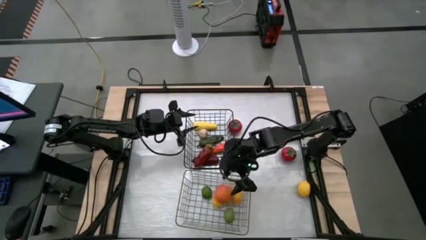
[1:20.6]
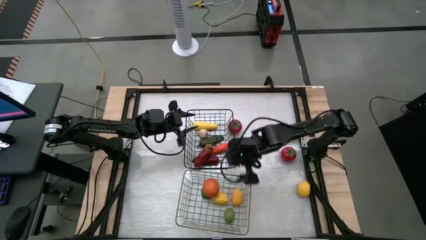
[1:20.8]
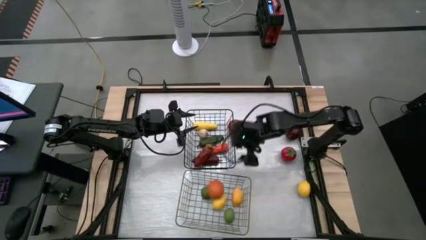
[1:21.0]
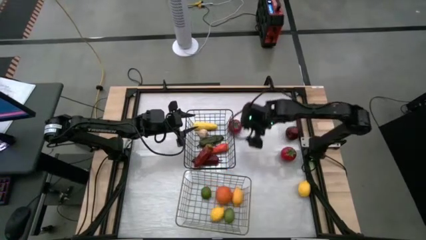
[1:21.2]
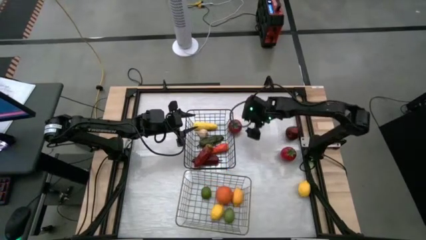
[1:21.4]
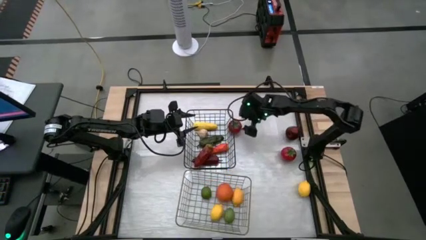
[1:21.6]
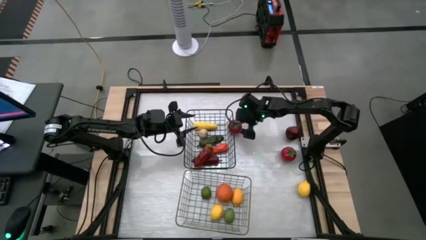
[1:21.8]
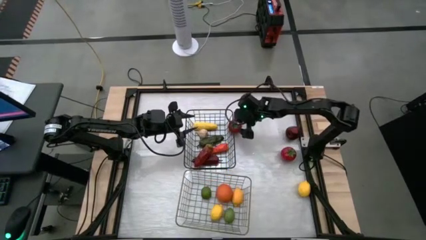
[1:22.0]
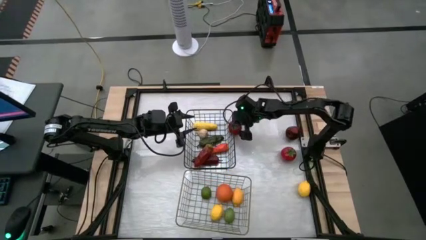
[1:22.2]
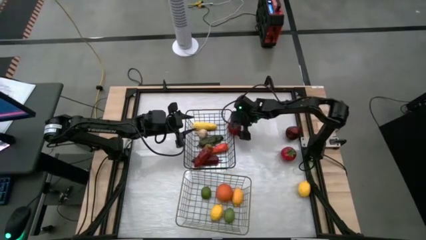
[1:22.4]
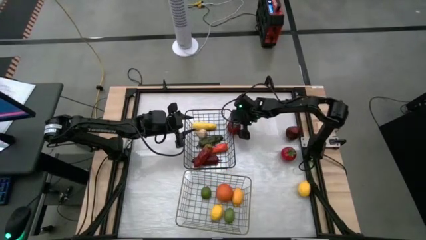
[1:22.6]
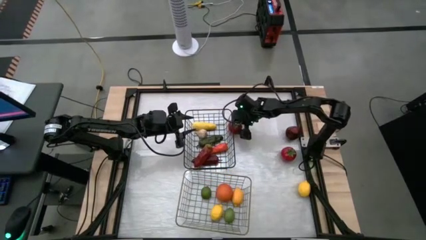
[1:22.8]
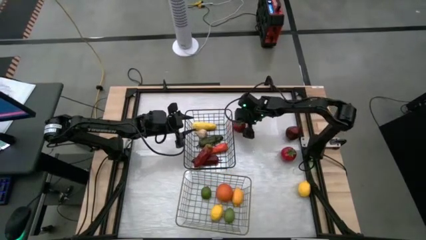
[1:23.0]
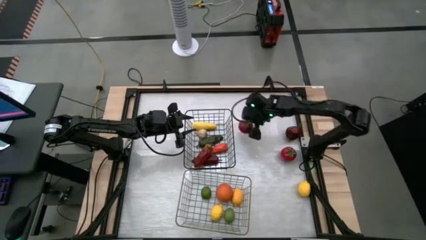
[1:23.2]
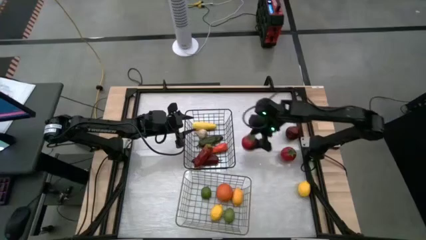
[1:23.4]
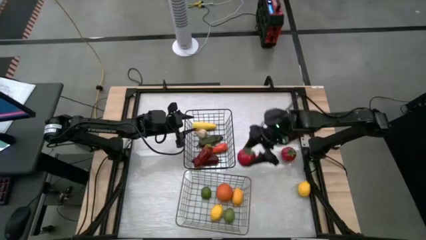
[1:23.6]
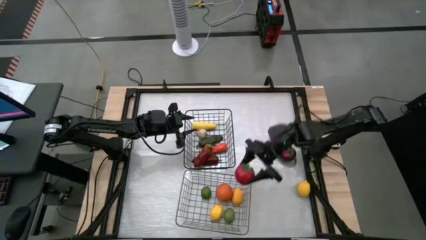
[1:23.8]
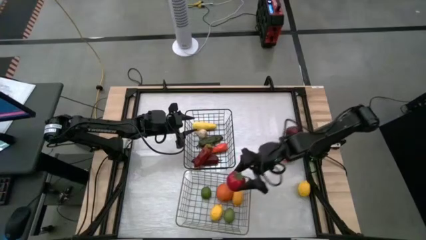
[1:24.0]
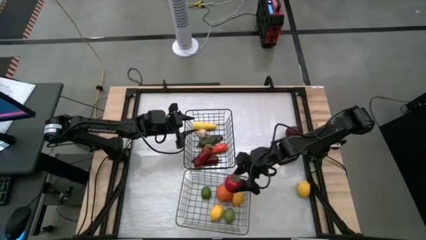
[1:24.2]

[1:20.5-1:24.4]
Task: Sort produce into baskets
Put the left red tomato into the gold wire basket

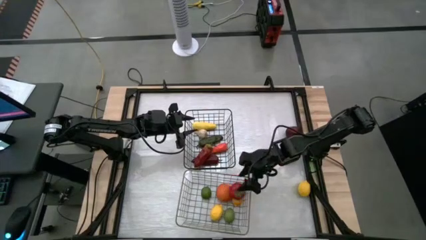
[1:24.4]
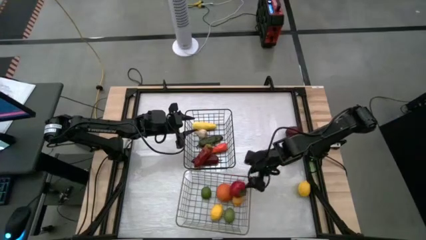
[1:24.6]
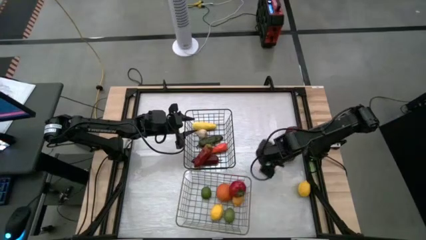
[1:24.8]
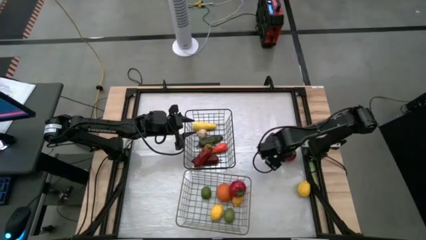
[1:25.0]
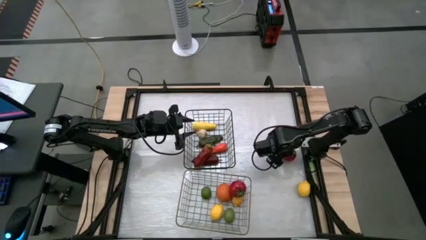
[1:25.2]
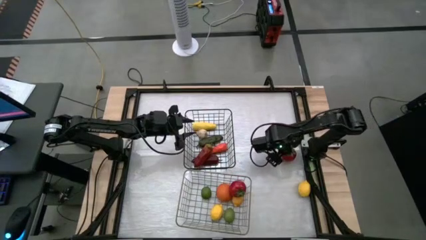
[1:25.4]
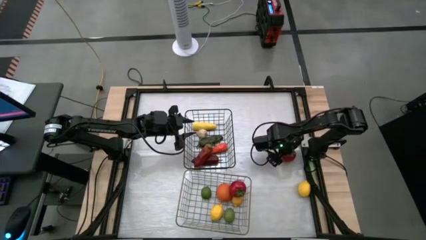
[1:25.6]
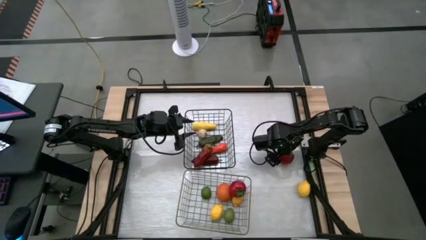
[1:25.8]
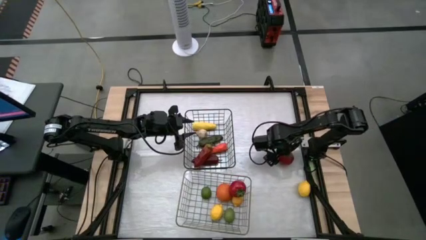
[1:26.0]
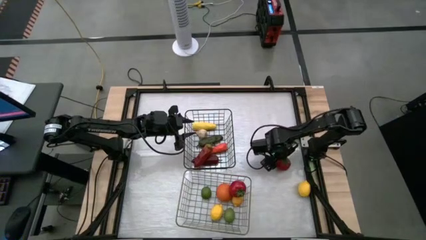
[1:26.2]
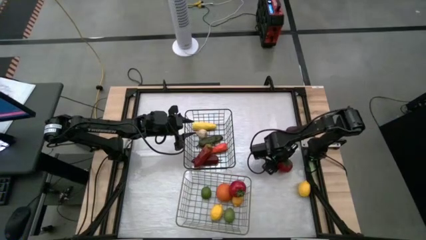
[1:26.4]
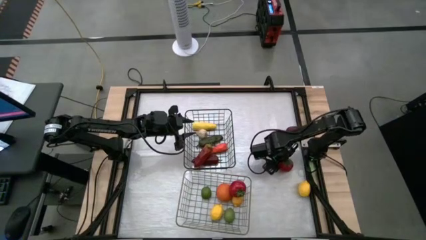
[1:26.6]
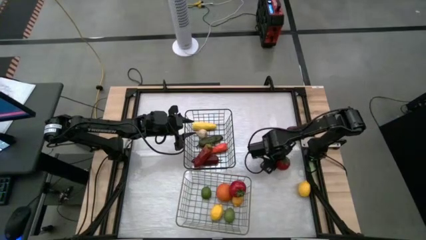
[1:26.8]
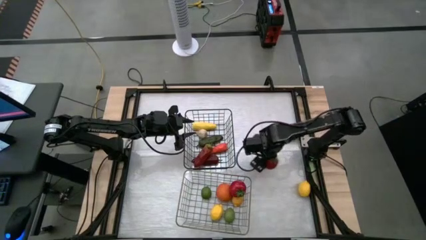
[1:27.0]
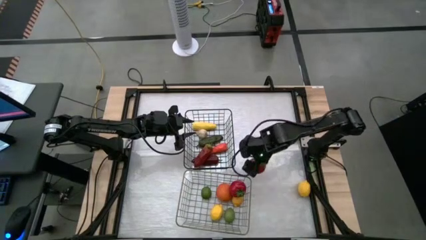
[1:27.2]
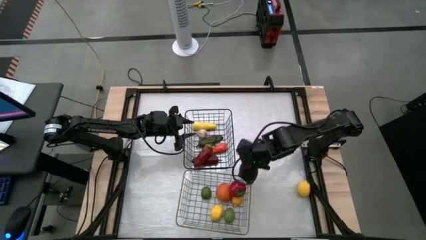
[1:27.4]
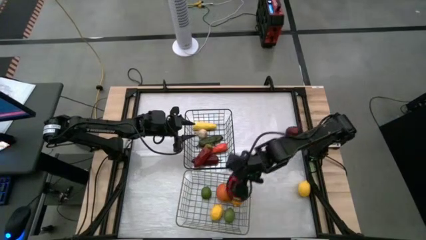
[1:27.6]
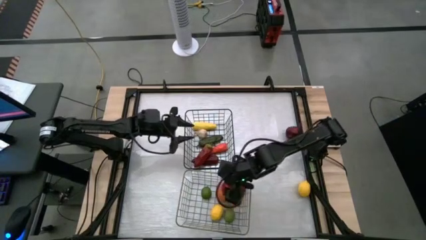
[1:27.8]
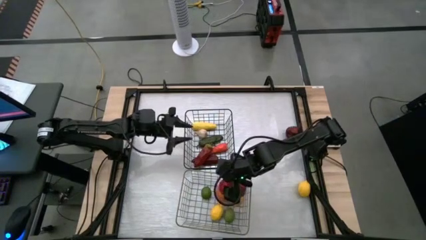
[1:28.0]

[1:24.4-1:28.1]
Put the red tomato into the gold wire basket

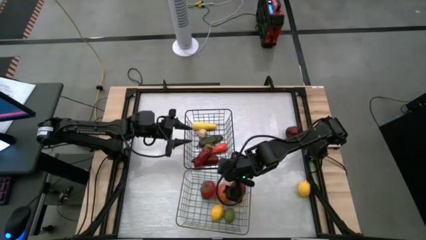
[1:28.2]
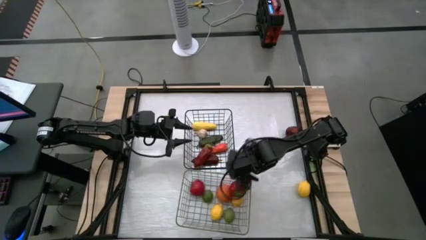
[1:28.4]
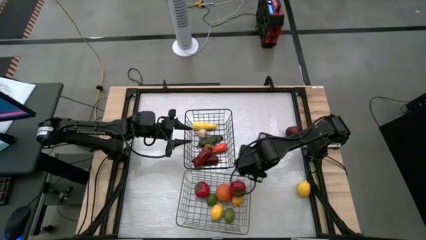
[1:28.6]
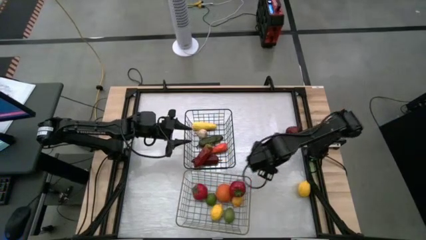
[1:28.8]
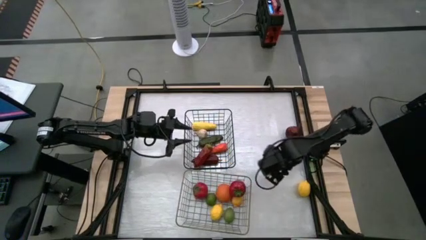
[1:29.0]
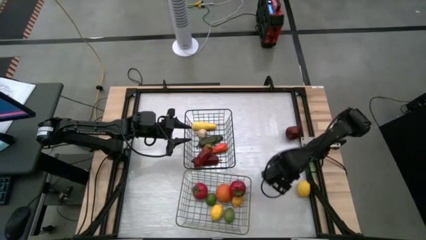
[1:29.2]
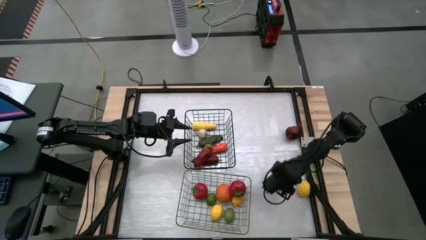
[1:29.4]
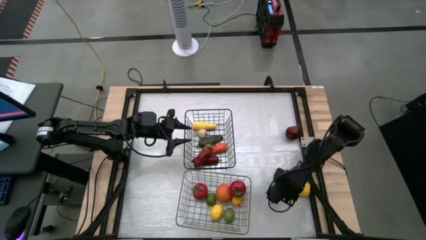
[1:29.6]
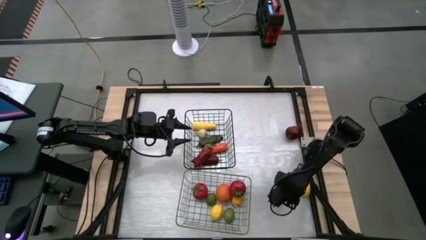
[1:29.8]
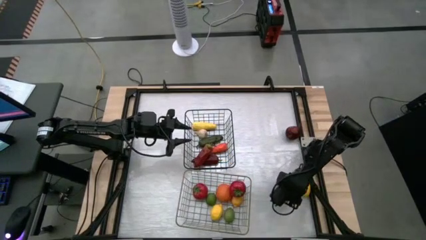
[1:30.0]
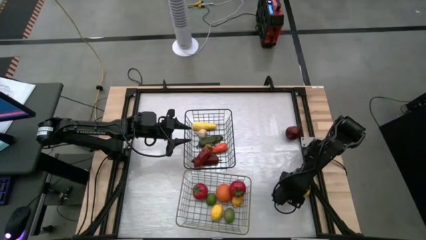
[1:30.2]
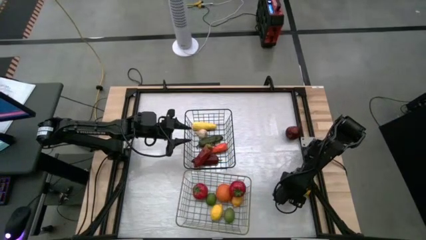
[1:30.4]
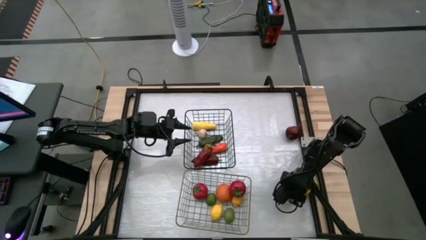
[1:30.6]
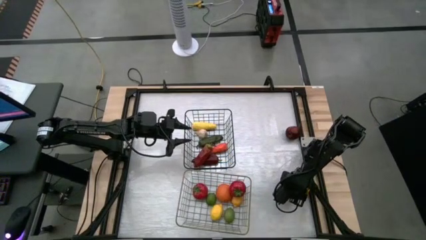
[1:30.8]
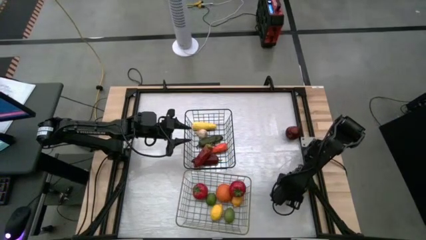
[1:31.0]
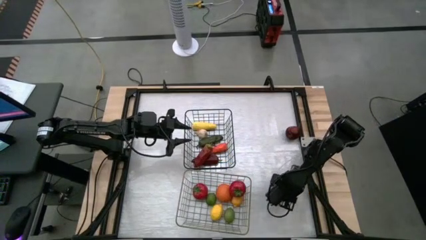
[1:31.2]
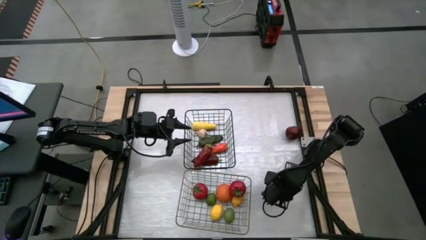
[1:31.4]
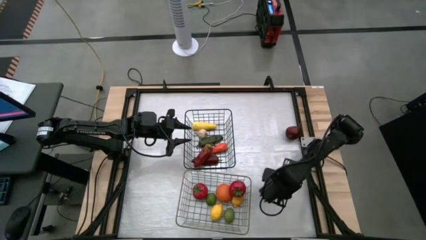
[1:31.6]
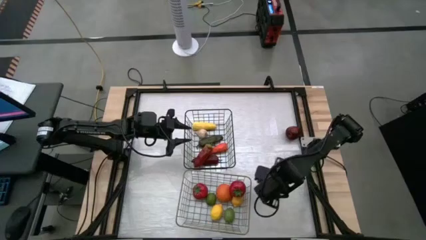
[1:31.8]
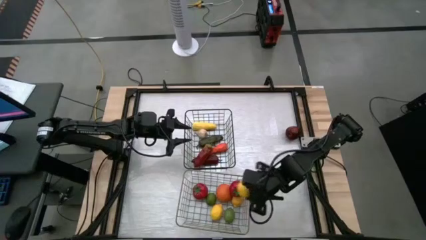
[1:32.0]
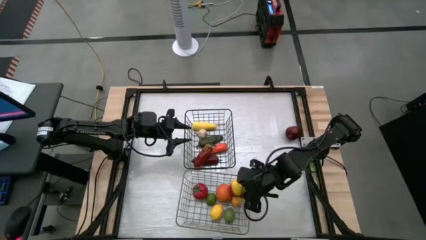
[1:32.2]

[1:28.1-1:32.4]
Put the yellow lemon into the gold wire basket

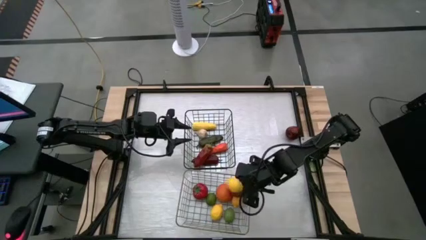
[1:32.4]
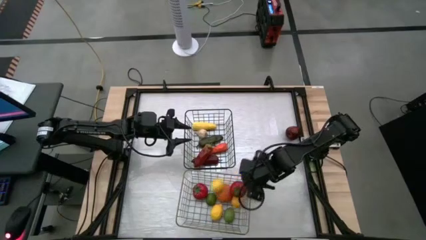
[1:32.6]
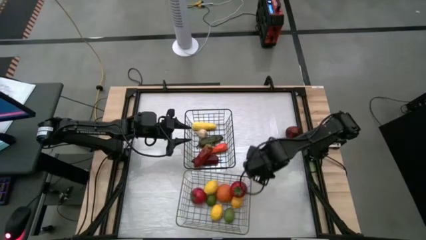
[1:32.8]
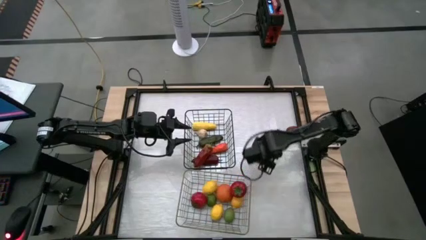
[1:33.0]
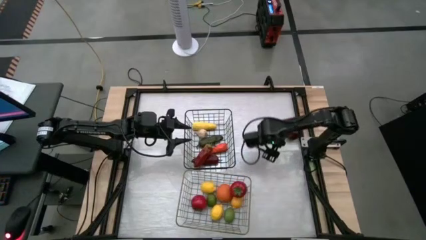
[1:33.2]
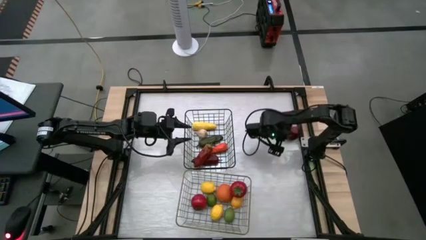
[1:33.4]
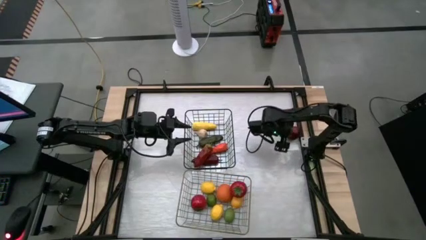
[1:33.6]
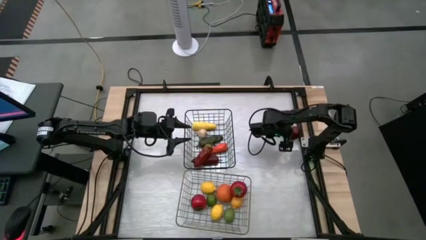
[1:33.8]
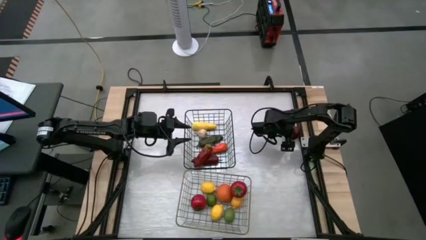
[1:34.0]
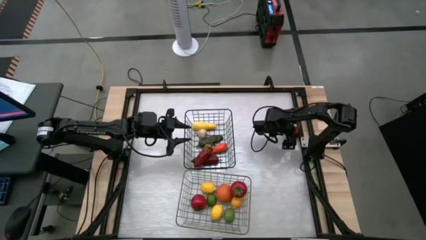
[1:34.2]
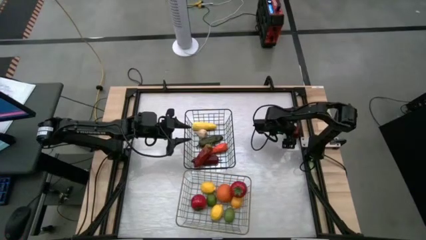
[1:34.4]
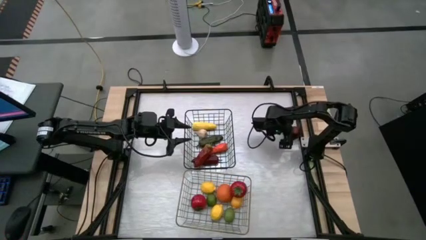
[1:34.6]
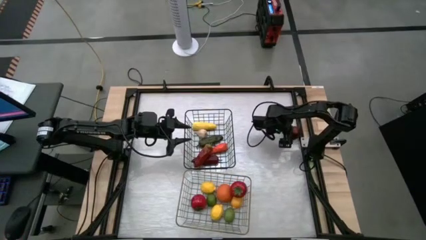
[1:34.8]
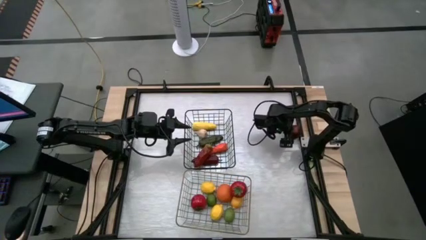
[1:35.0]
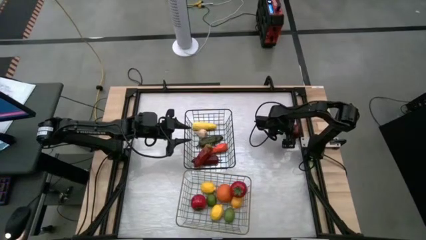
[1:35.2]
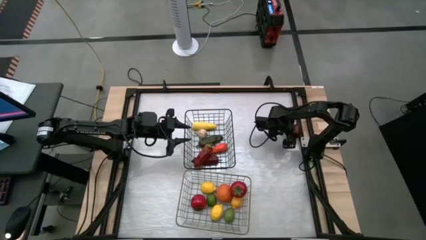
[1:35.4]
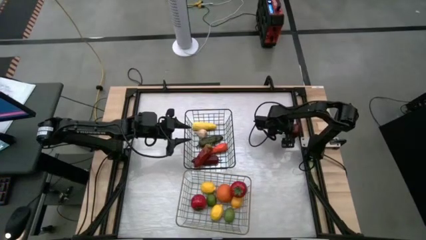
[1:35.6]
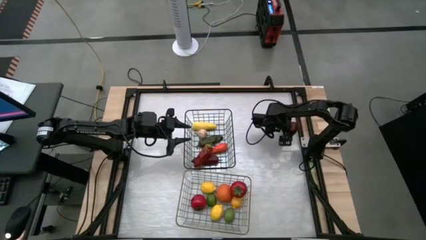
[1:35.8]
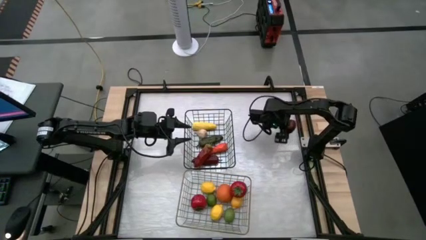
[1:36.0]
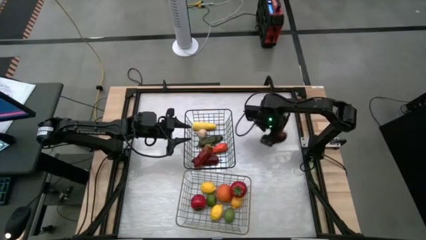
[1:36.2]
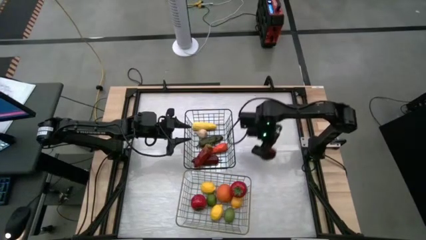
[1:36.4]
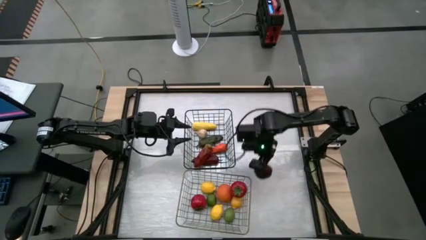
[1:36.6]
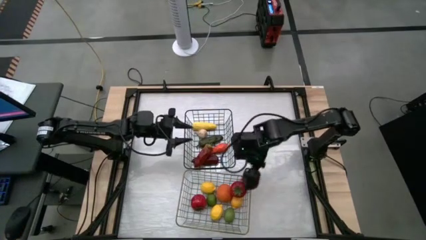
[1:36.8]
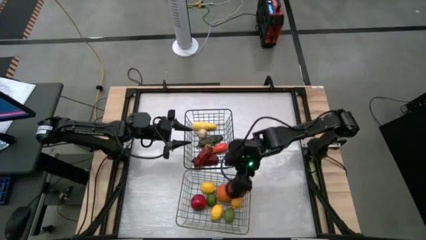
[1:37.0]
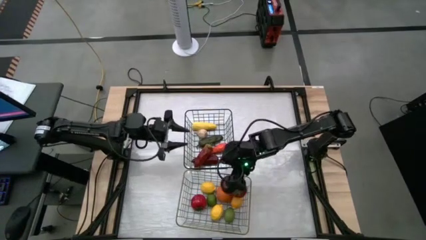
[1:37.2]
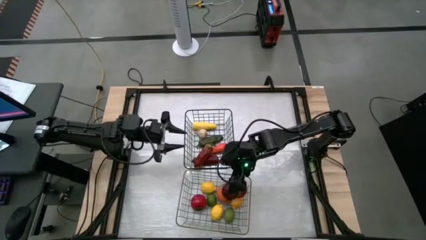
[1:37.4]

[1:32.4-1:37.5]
Put the red apple into the gold wire basket
